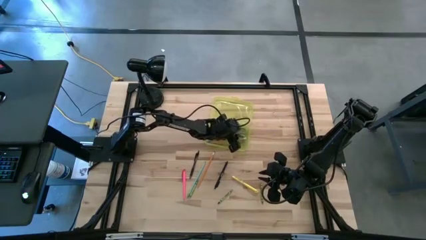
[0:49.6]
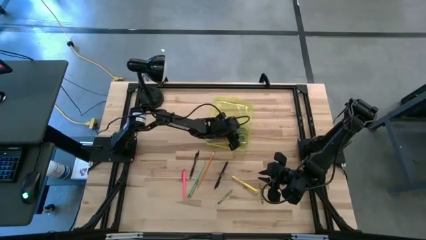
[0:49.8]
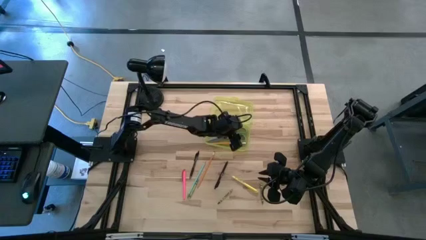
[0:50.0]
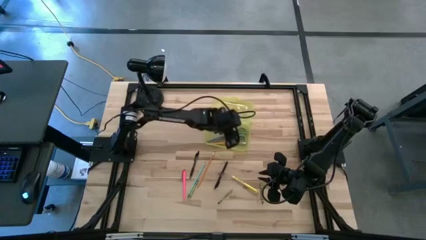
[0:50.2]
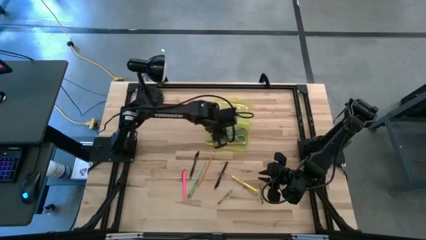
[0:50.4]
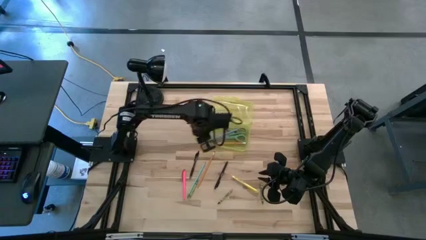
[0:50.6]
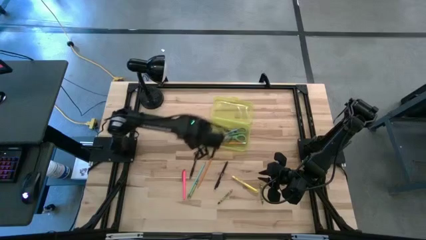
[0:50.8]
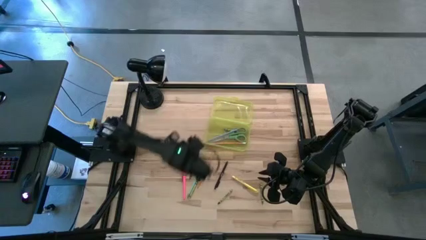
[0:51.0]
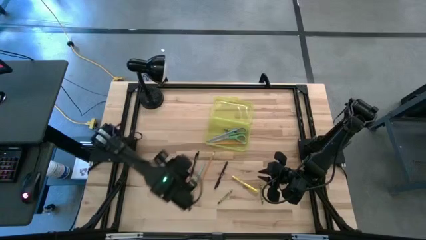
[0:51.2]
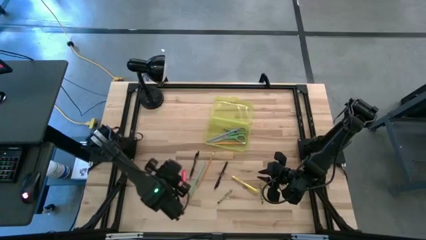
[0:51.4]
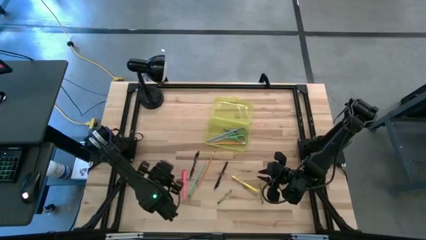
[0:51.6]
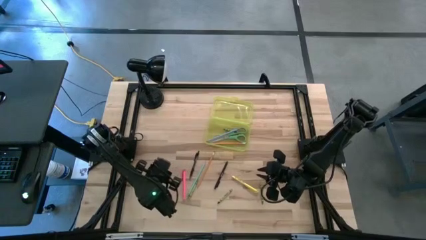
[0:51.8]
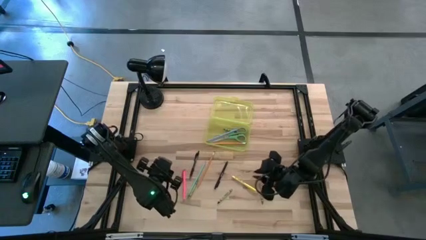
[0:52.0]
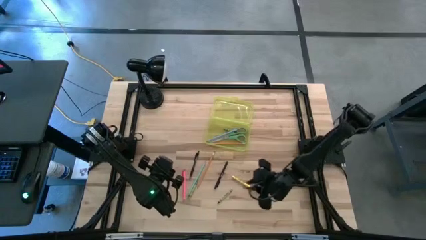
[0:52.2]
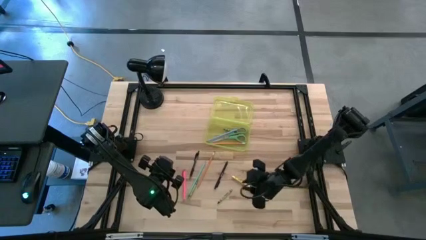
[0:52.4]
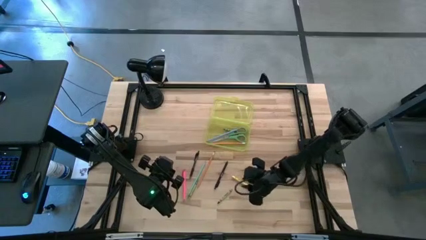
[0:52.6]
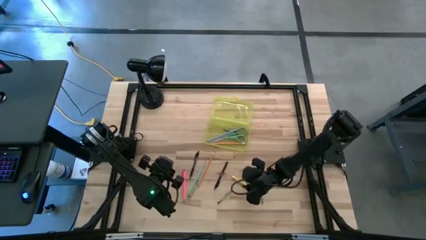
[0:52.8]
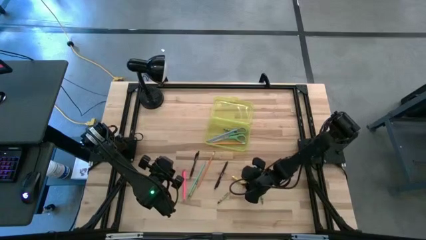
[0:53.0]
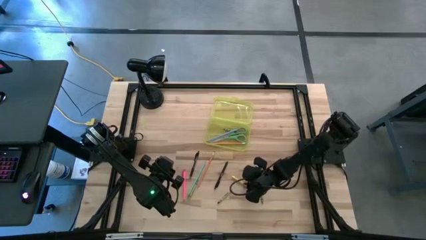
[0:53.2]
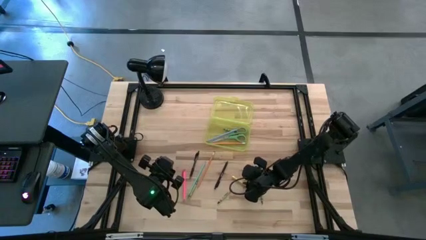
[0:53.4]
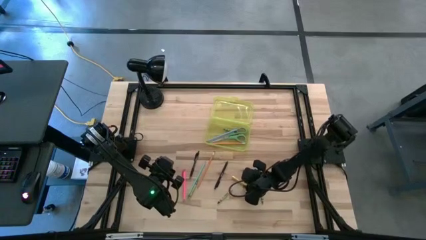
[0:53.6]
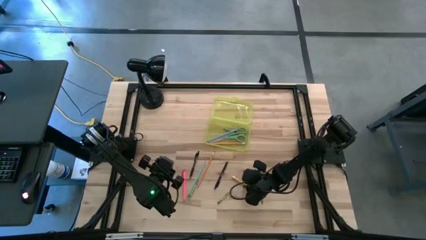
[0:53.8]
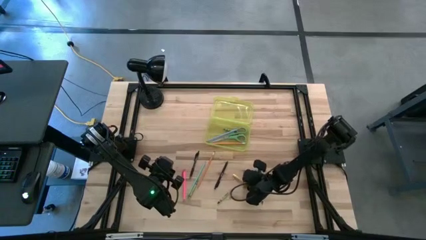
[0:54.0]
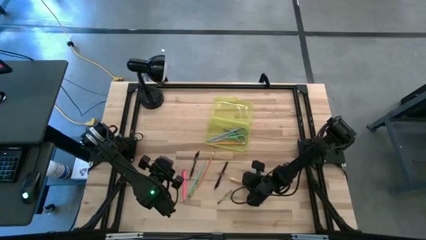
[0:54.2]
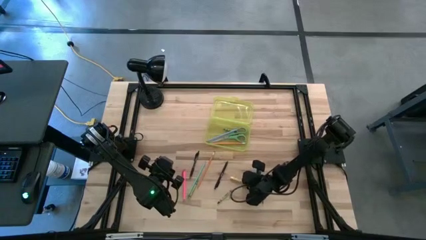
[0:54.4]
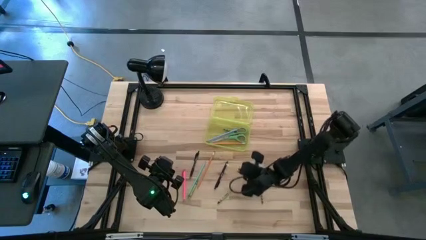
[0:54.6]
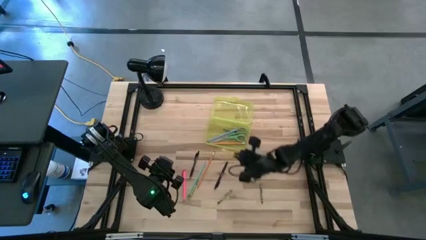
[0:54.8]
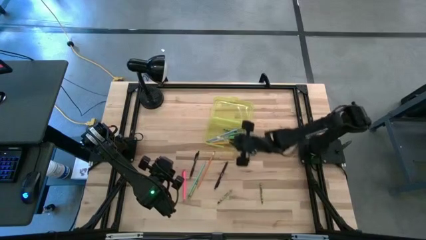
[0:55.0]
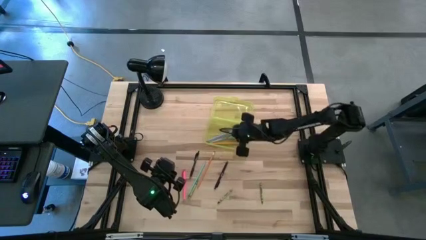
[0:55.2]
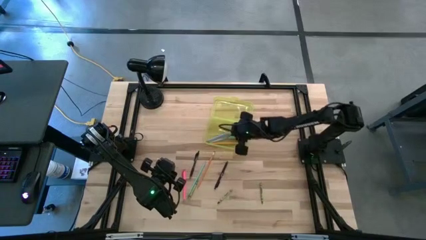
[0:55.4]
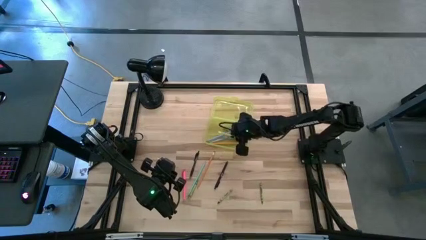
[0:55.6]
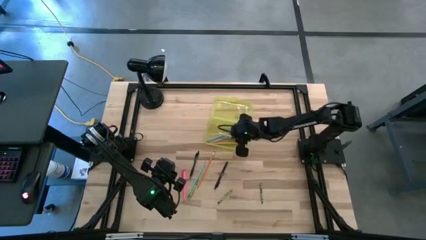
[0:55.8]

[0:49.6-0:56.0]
Task: Pick & place school supplies into a supply box
Put the yellow pen into the yellow supply box

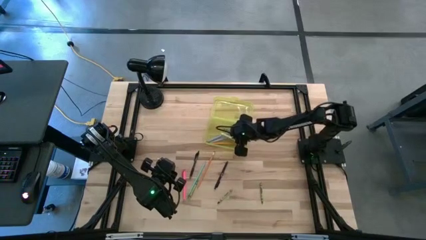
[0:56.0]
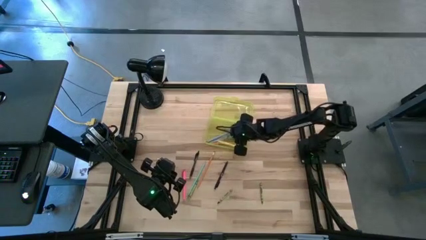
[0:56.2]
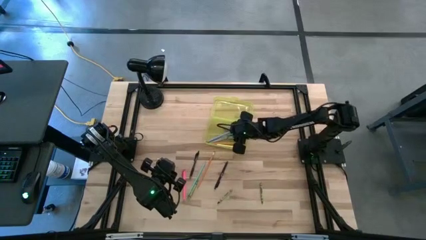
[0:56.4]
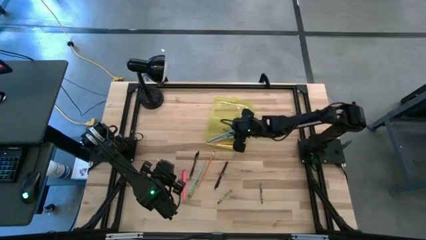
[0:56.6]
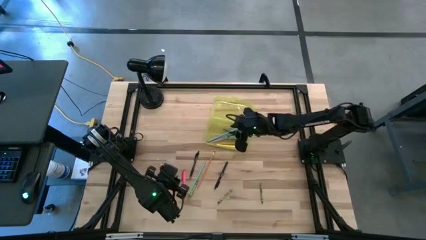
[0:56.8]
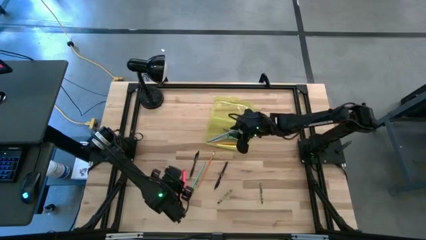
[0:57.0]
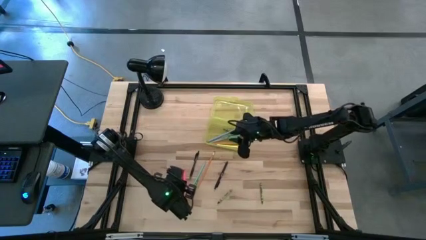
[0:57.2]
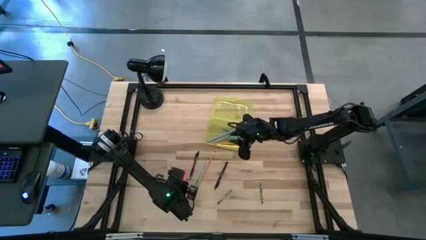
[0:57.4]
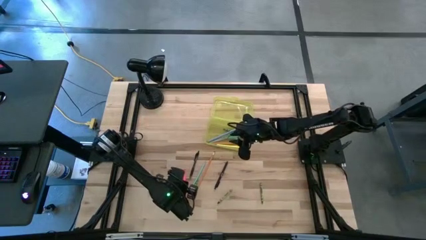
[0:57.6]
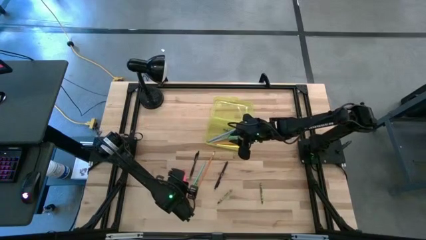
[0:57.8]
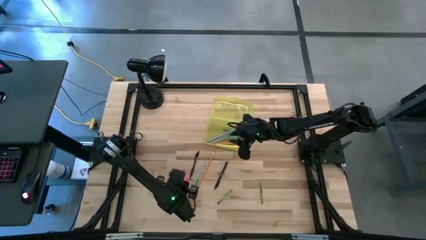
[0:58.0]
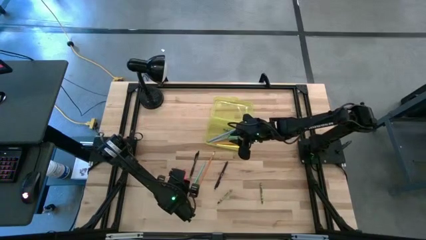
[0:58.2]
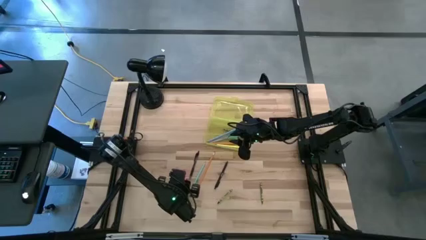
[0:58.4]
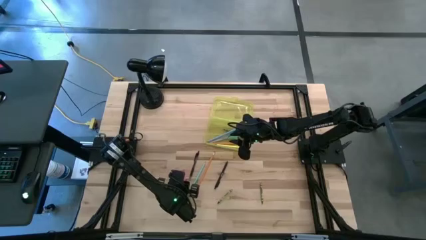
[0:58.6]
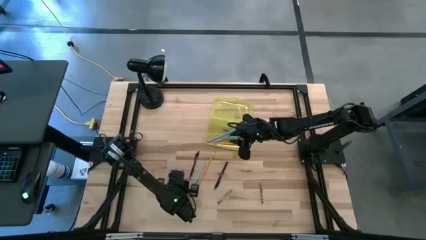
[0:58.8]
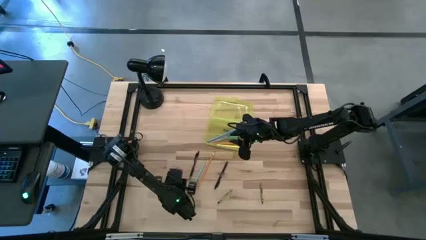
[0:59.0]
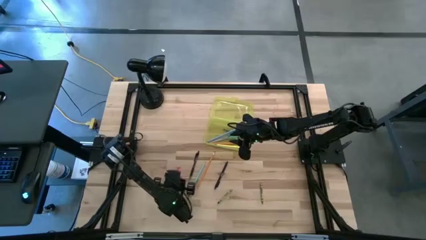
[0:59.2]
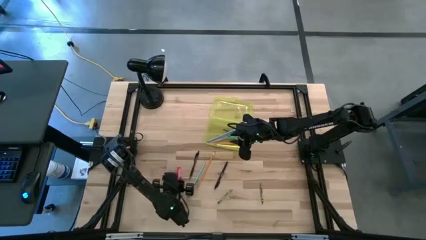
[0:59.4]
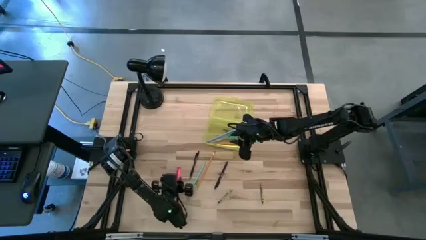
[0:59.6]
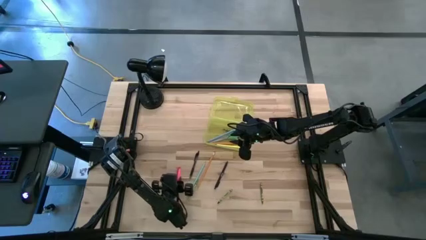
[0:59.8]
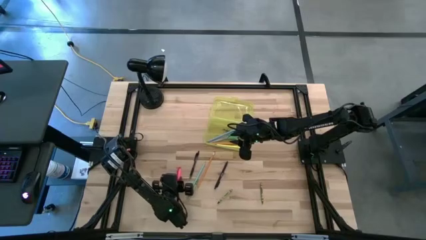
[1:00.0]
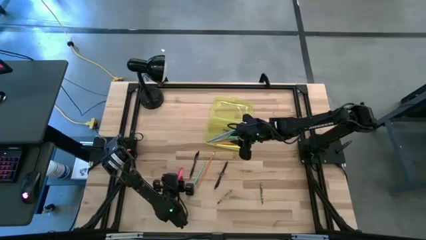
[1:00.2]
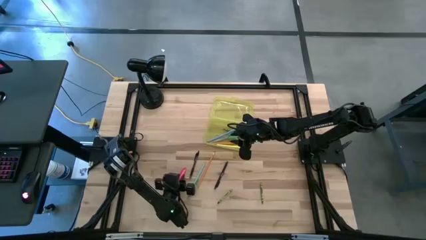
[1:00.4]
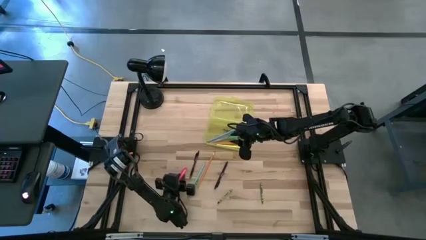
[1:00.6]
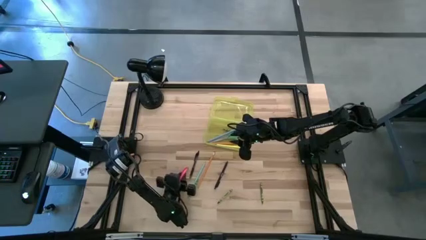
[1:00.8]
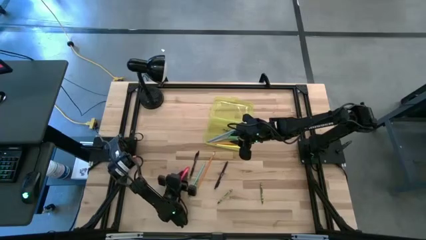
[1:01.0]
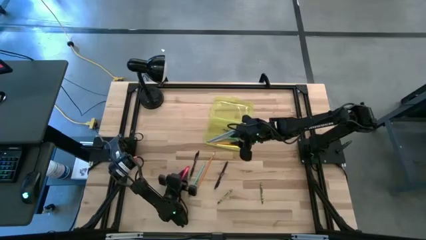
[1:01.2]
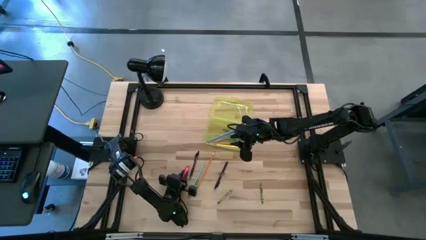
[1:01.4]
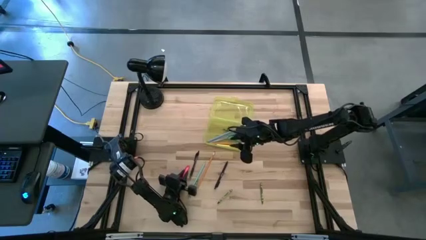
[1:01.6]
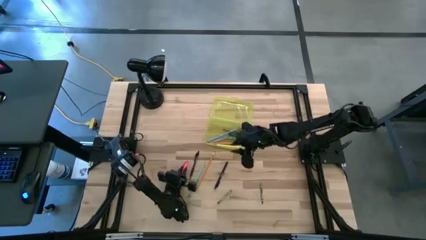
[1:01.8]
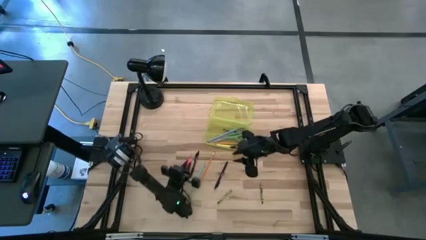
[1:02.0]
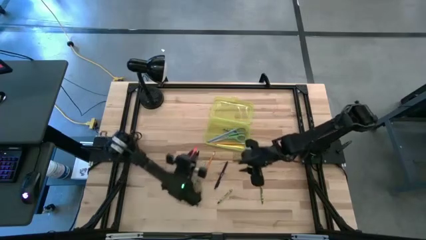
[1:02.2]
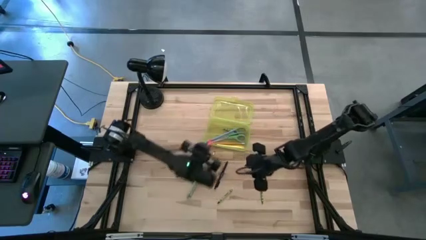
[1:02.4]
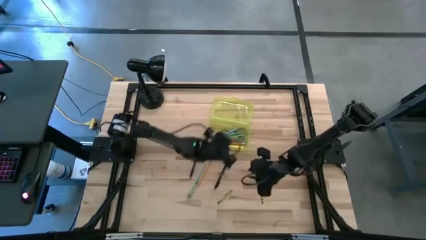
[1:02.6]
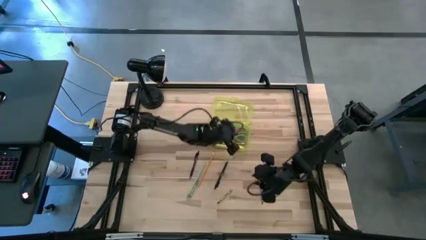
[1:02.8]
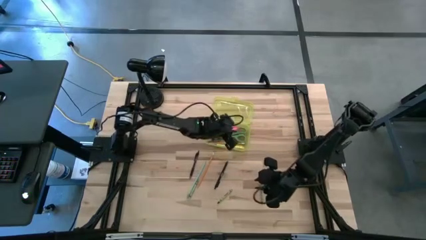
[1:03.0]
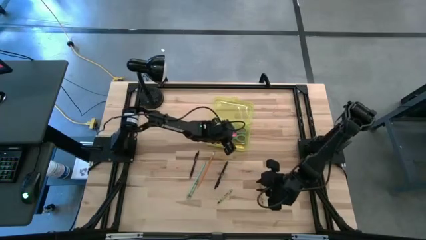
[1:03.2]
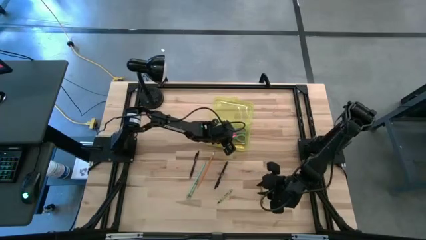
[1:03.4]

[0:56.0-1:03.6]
Put the pink pen into the yellow supply box

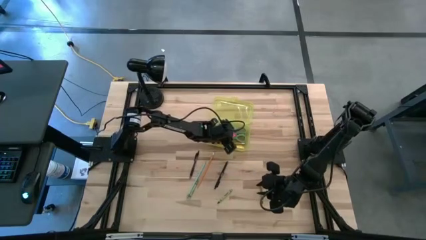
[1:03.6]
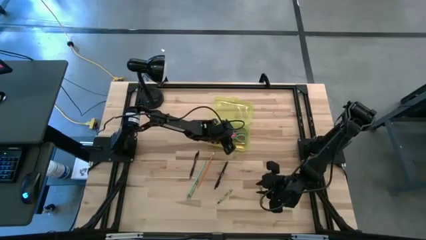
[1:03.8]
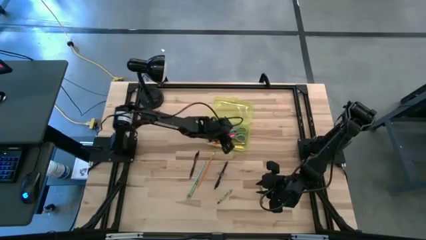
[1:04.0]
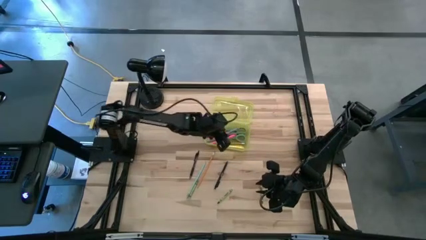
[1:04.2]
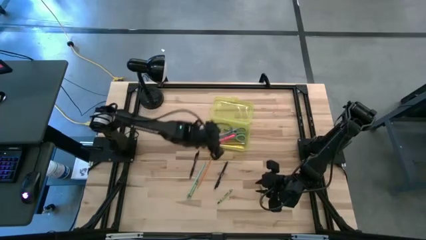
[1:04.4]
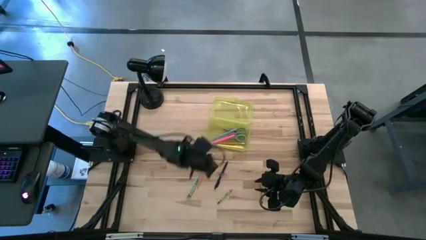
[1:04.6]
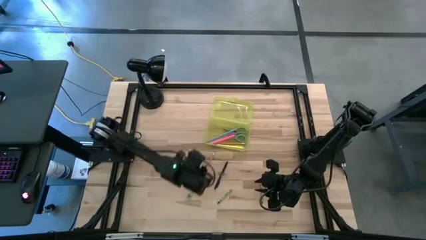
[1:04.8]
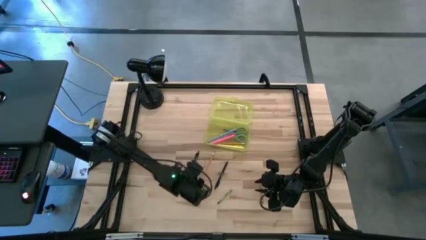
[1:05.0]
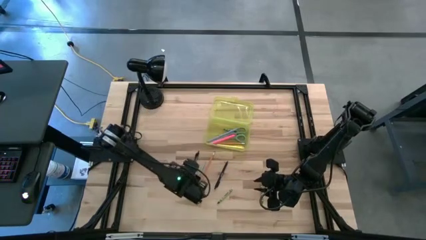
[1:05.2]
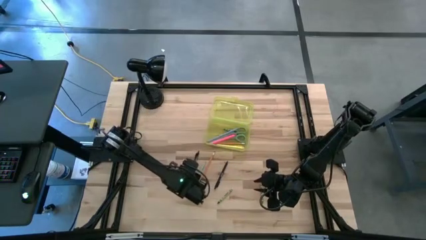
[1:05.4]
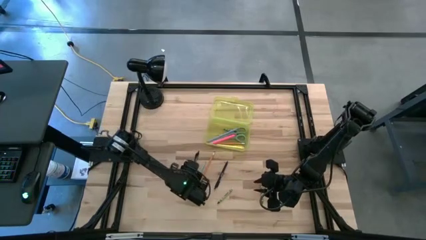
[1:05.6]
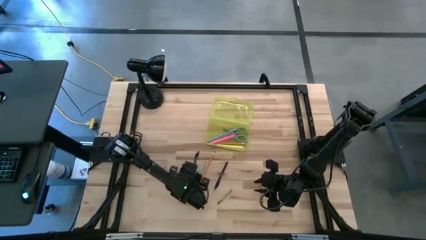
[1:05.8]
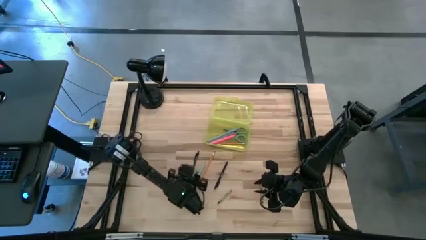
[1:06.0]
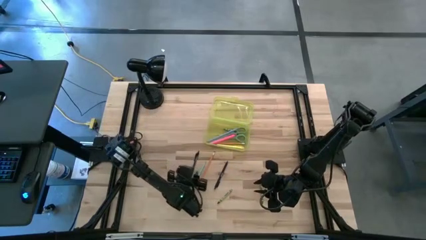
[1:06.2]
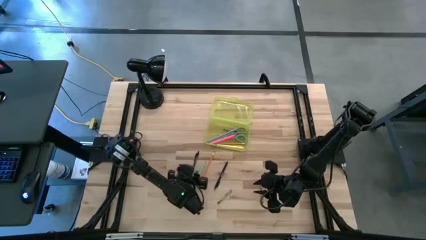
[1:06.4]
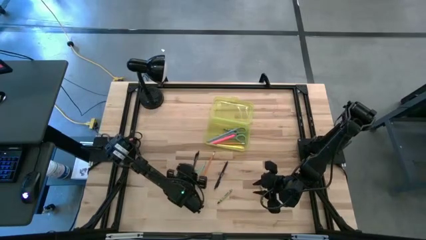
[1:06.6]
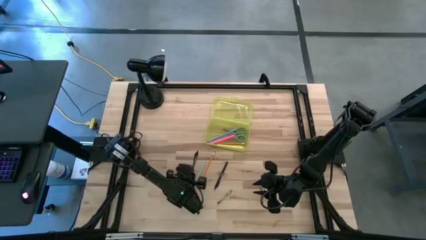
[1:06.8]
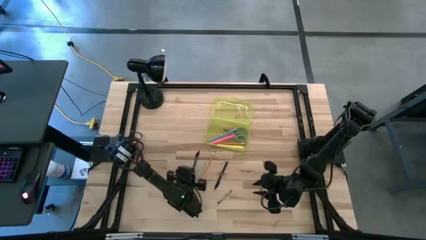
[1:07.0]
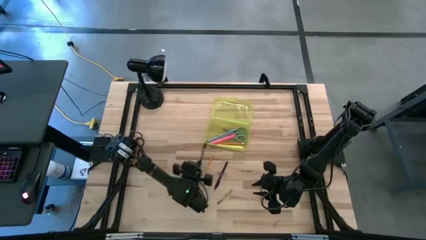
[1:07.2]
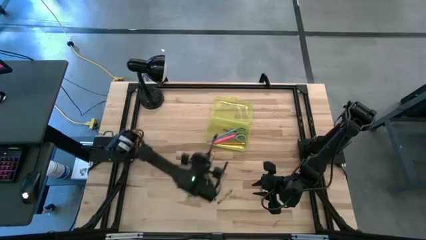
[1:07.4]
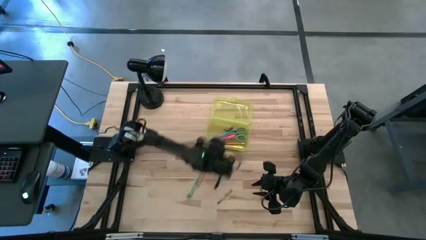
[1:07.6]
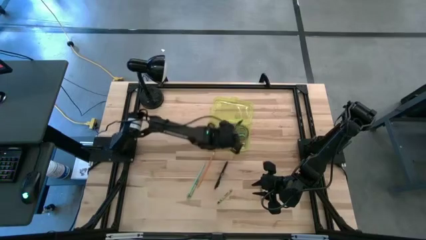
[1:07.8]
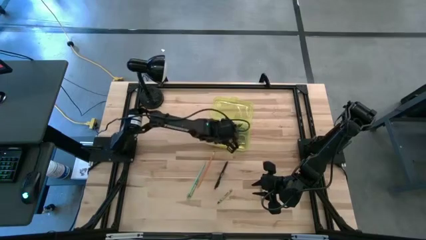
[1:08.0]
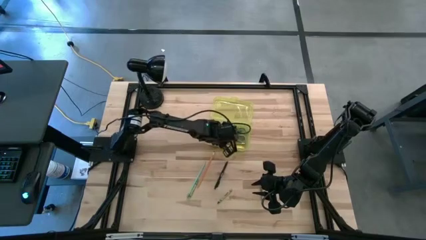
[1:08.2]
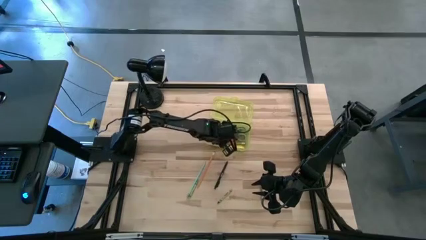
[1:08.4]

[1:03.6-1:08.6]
Put the left black pen into the yellow supply box
